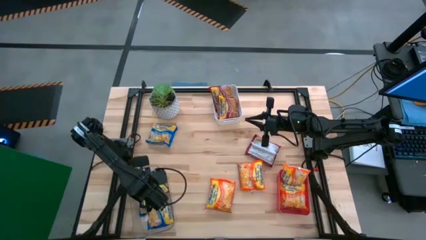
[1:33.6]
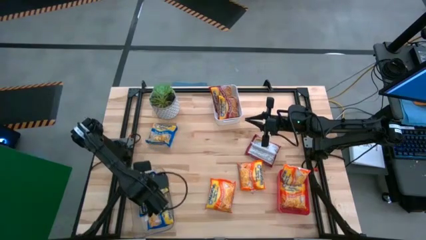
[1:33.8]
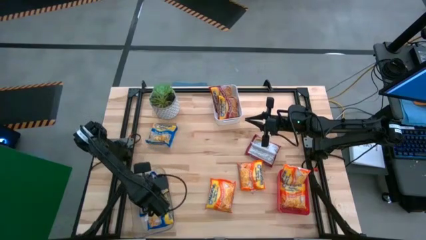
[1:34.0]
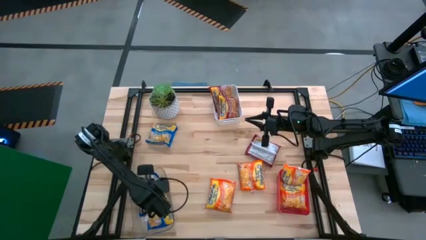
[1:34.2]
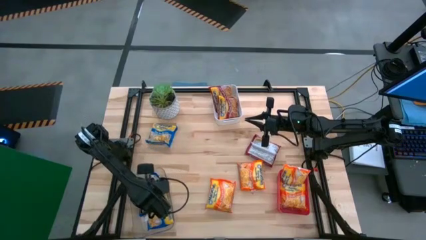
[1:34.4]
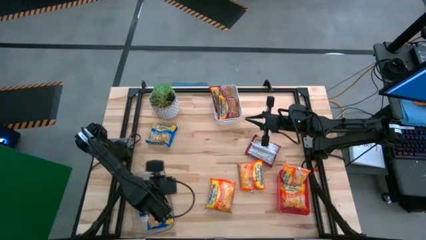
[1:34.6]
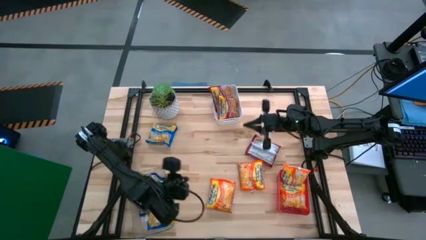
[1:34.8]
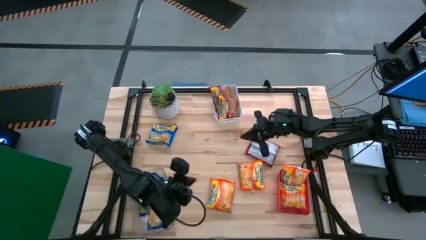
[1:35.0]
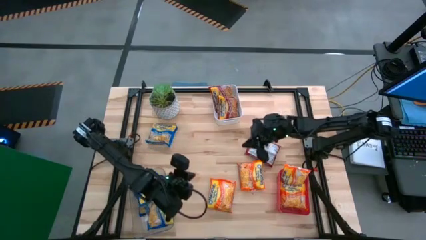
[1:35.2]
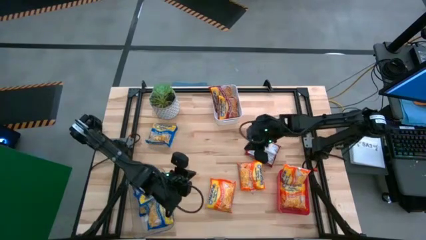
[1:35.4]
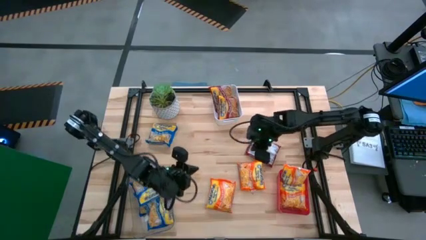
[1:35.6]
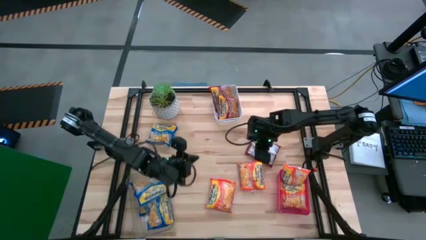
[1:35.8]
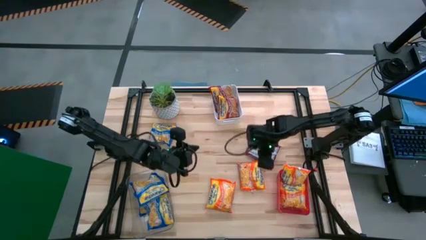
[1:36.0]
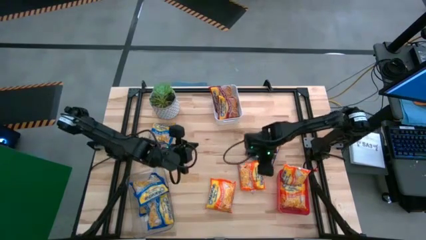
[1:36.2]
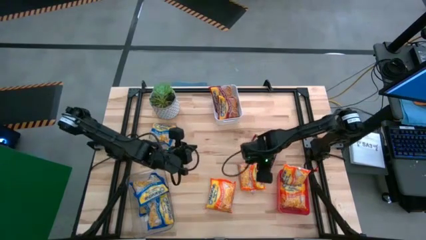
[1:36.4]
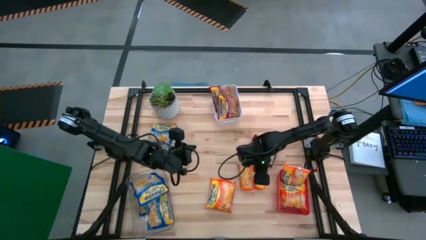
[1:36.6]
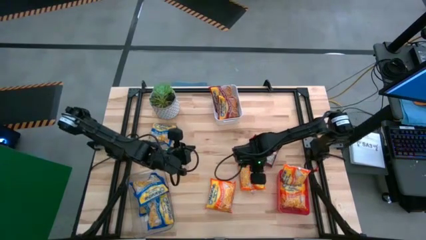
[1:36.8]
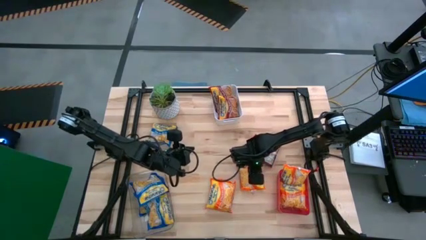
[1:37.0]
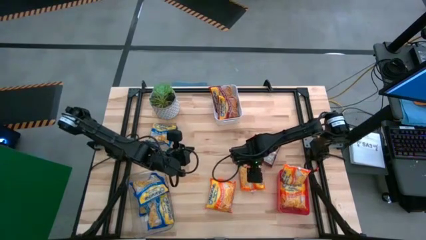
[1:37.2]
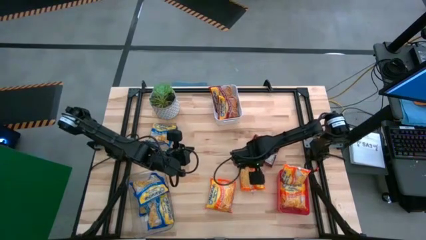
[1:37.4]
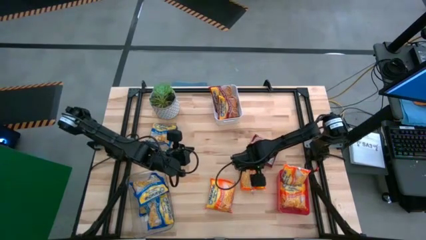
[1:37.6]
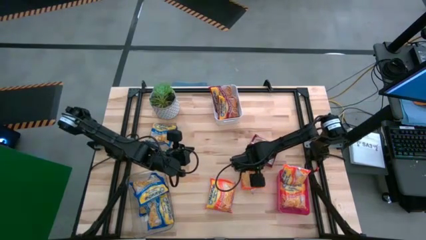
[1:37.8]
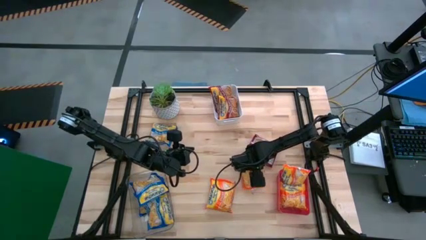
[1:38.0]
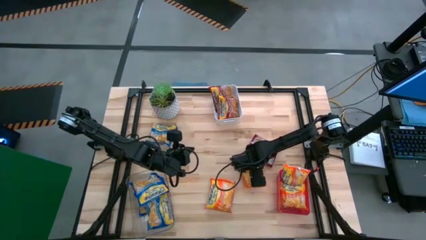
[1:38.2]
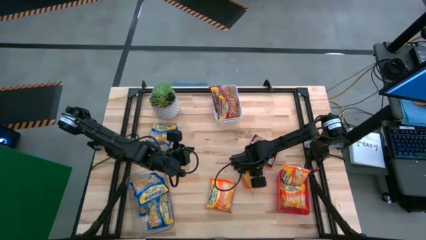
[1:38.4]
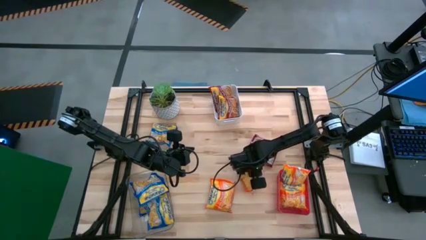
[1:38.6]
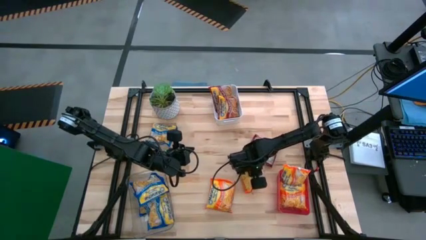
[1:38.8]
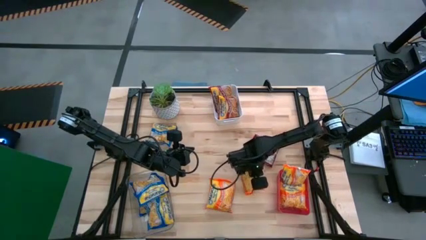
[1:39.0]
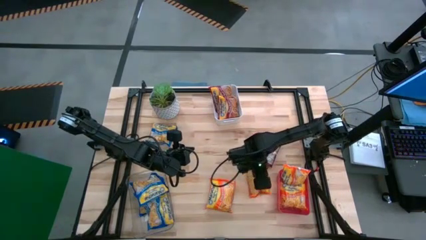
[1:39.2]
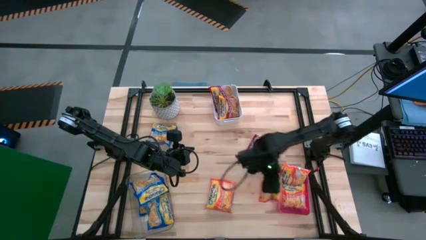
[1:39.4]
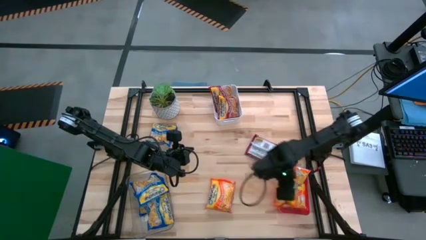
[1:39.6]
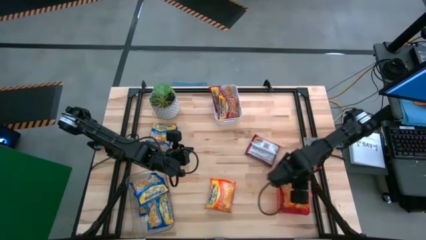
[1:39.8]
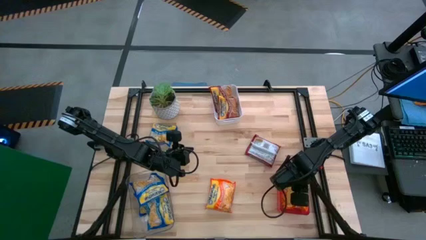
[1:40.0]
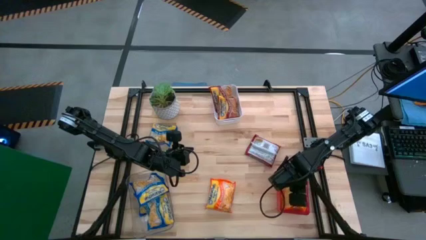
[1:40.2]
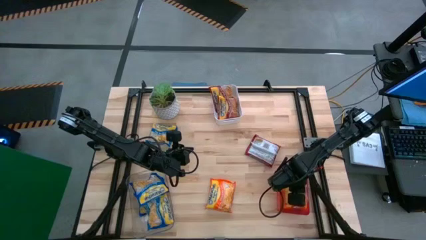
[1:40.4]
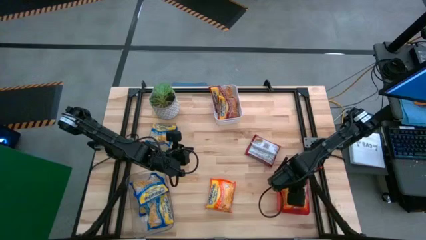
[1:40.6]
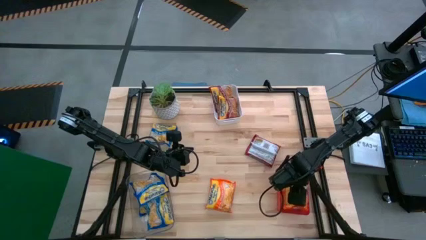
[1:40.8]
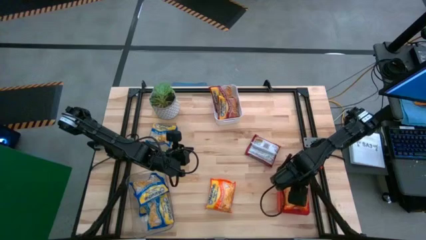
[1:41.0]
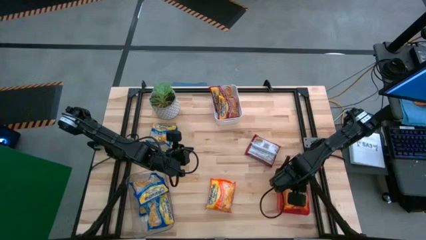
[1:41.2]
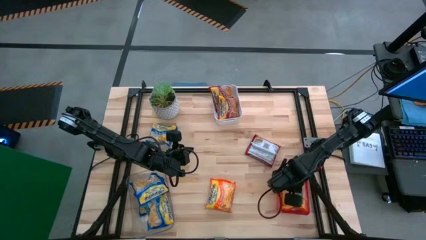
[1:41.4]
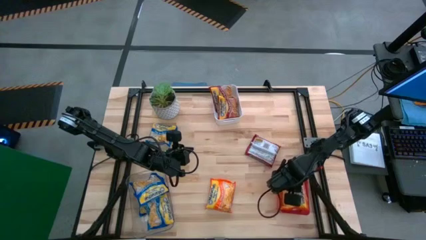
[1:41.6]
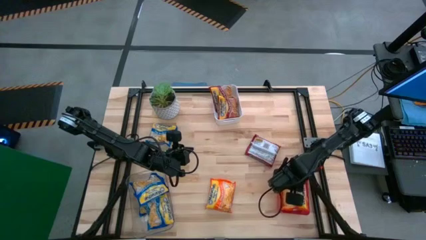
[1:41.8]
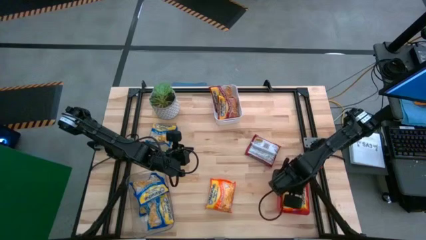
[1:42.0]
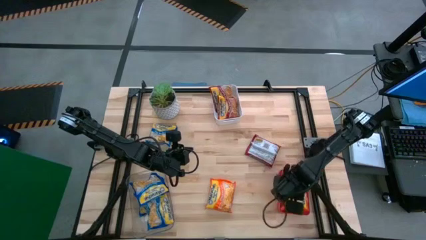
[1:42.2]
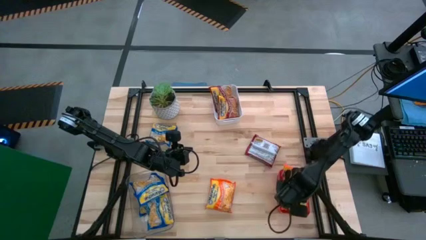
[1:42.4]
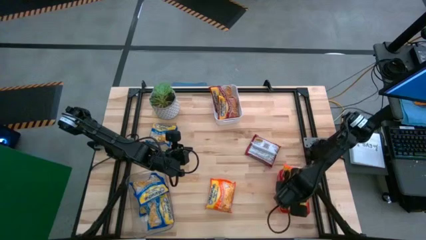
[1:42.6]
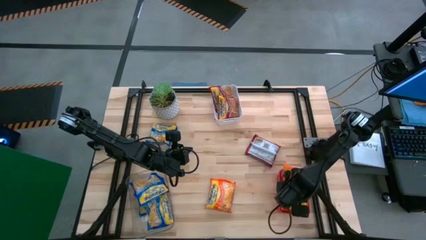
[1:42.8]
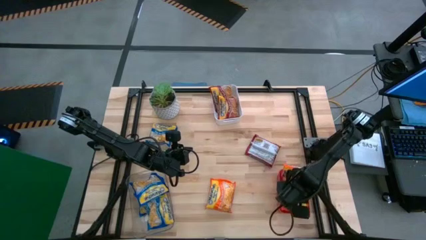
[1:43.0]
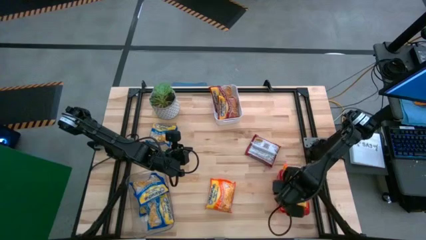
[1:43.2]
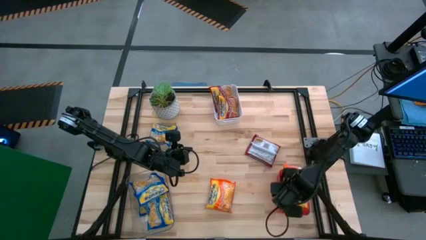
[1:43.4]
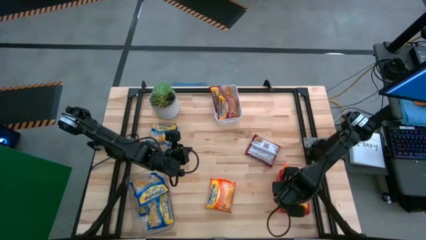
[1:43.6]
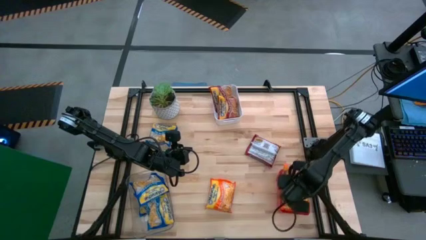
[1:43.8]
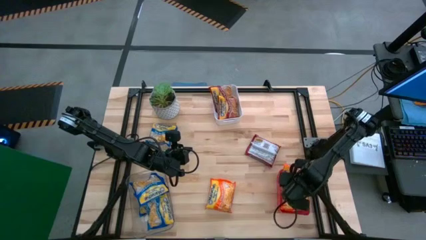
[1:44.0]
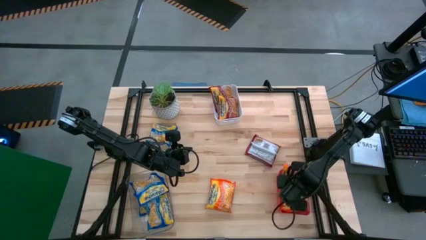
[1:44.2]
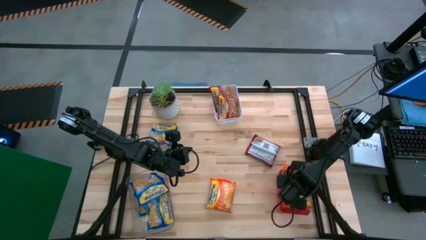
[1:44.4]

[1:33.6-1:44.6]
Task: Sort Maruchan noodles
Put the top orange noodle pack into the pink bin

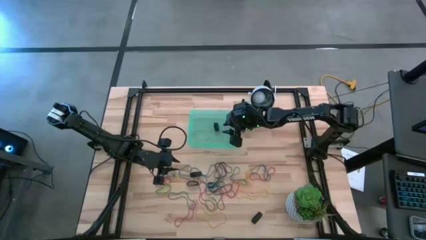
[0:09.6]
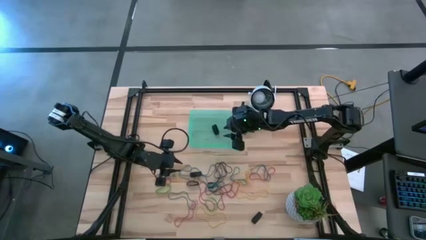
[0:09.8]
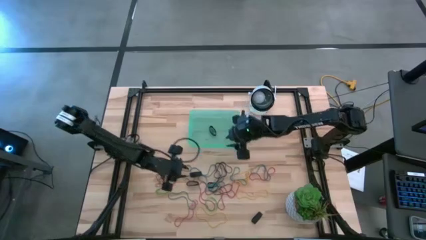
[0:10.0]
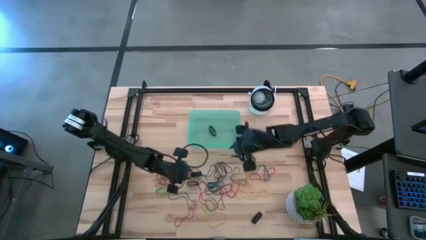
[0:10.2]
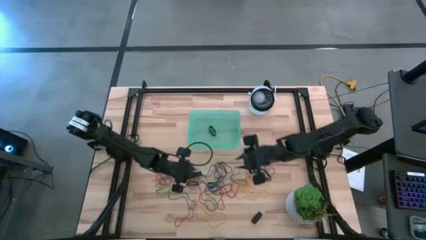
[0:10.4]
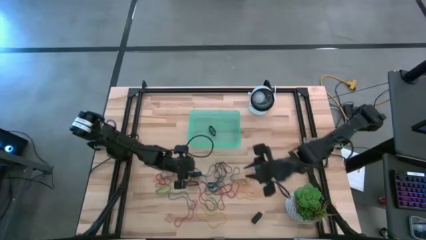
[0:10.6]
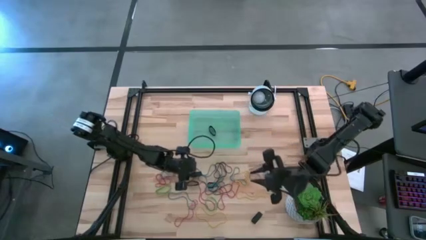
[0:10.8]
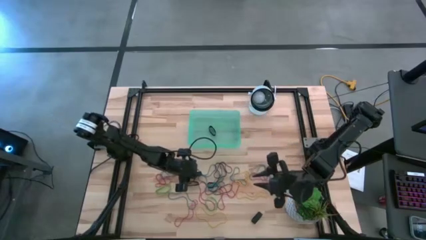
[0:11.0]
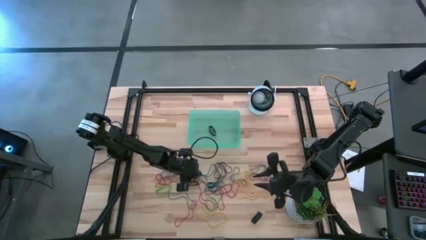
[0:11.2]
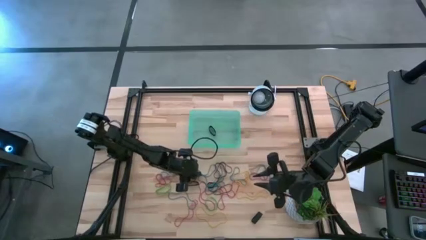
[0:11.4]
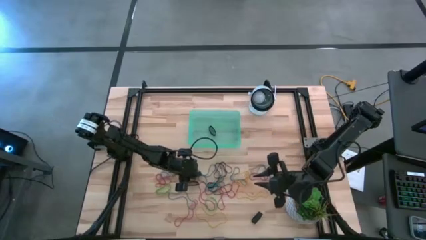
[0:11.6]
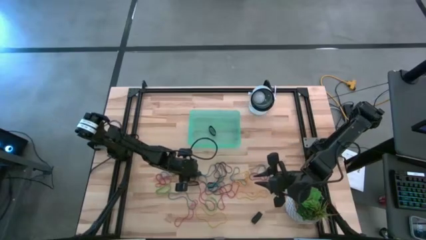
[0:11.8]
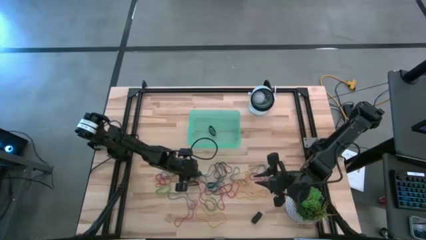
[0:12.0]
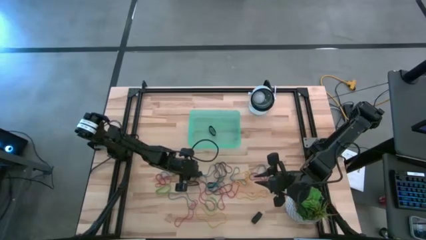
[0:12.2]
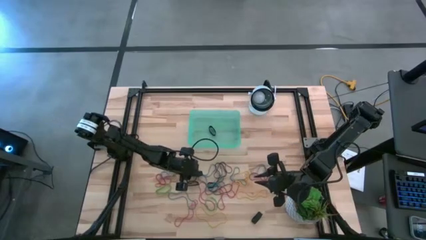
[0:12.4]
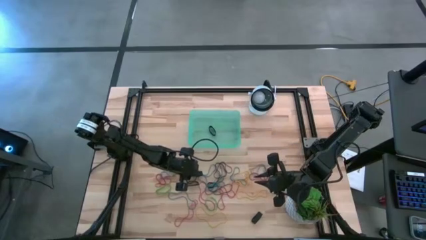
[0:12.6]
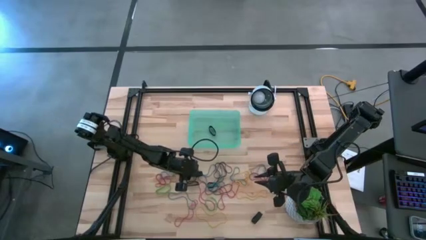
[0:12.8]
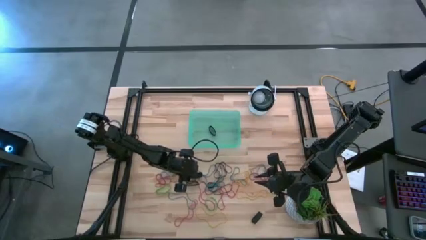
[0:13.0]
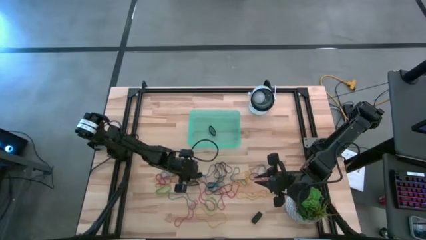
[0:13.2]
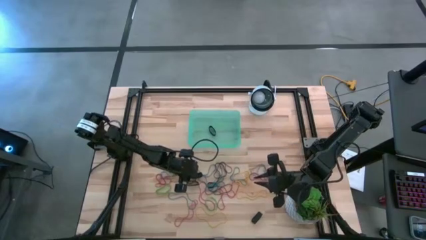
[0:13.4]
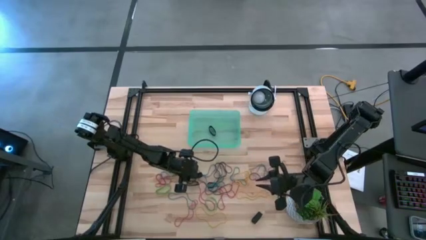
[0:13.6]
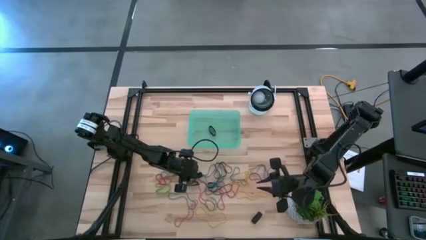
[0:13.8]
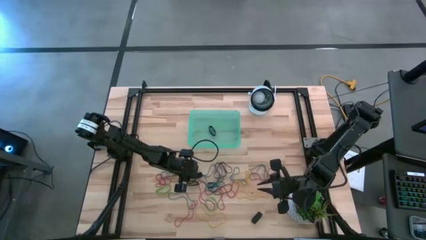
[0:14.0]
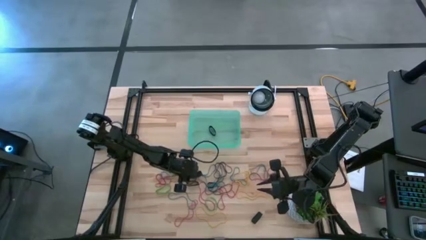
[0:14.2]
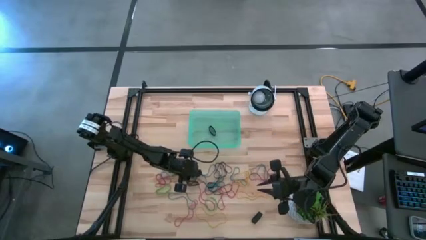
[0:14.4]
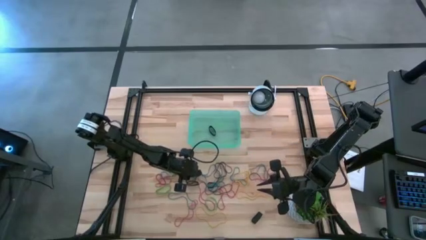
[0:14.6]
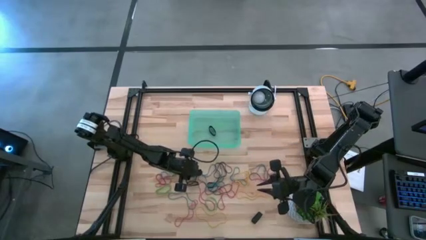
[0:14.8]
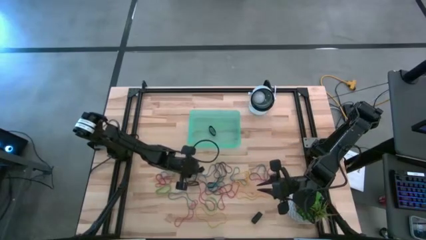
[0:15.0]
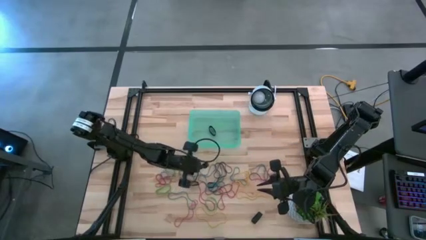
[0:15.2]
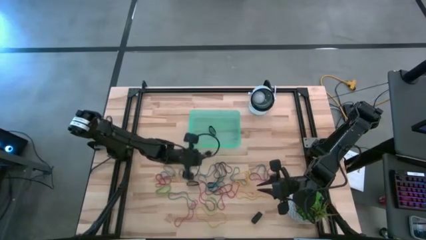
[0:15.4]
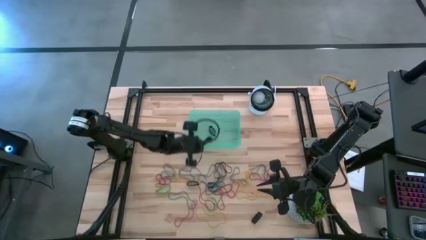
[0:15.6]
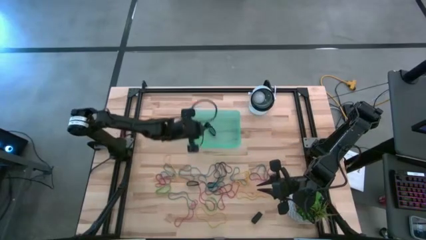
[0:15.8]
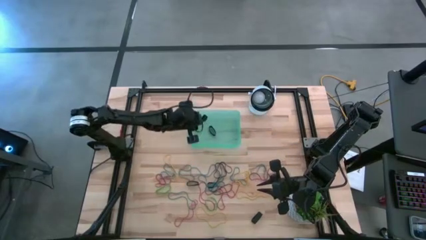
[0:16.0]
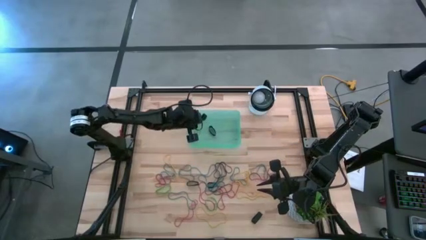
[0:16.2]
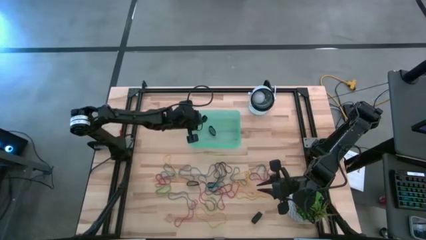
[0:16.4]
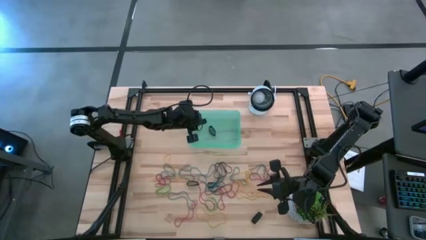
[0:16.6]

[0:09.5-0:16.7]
Task: Pick and place rubber bands into bin
Put the black rubber band into the green bin
